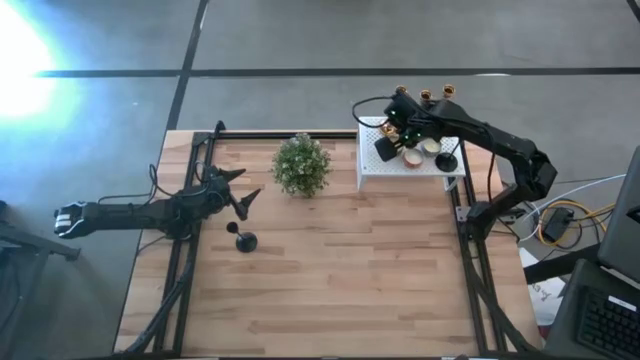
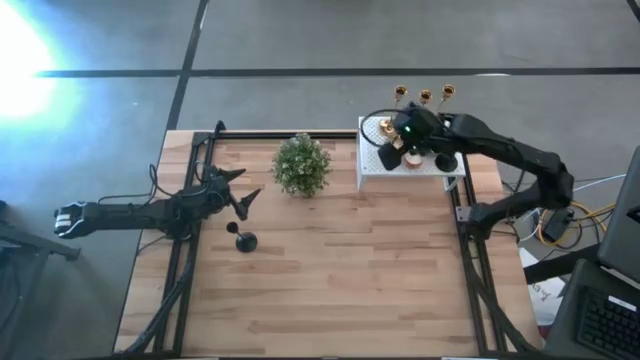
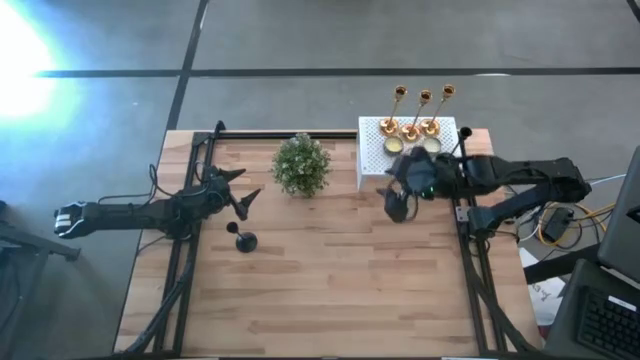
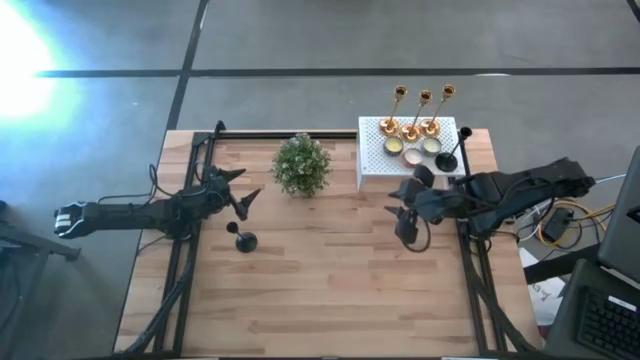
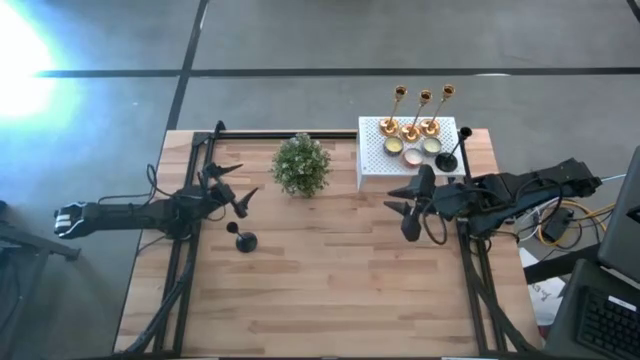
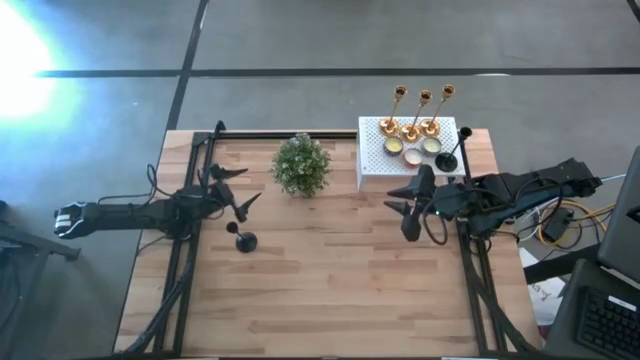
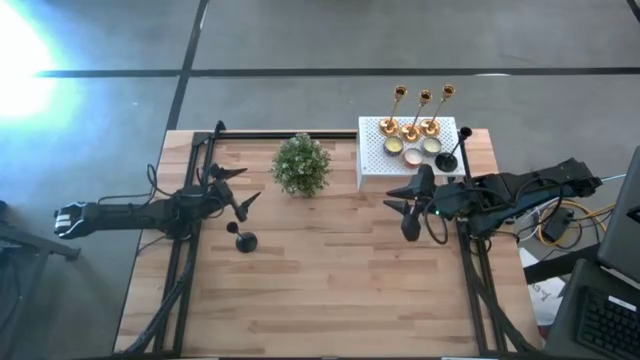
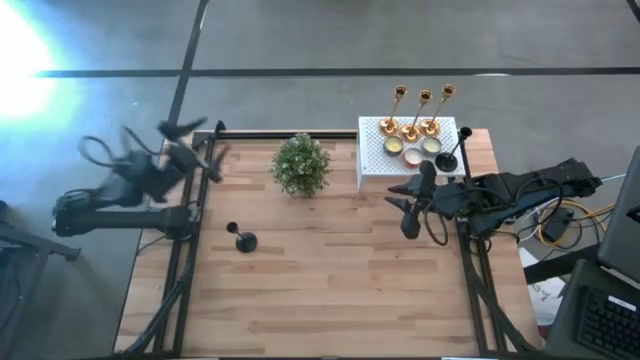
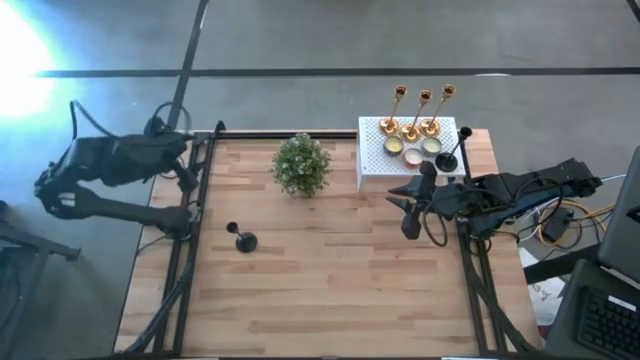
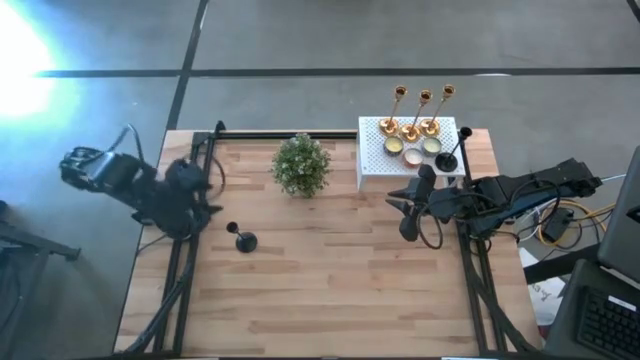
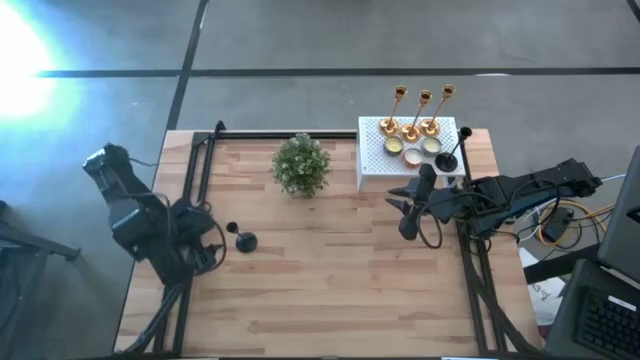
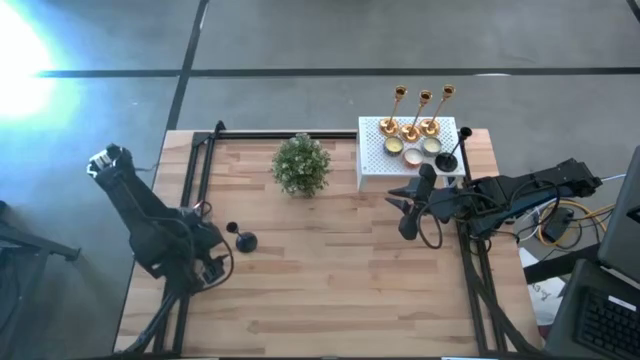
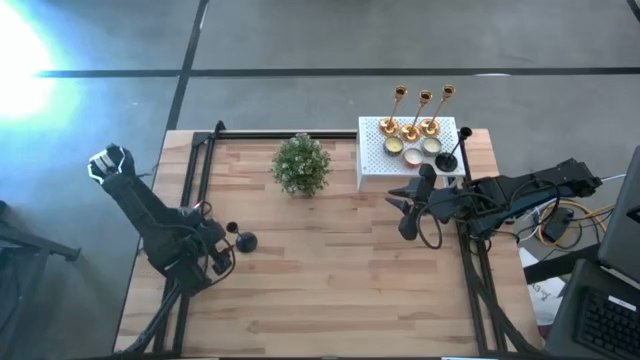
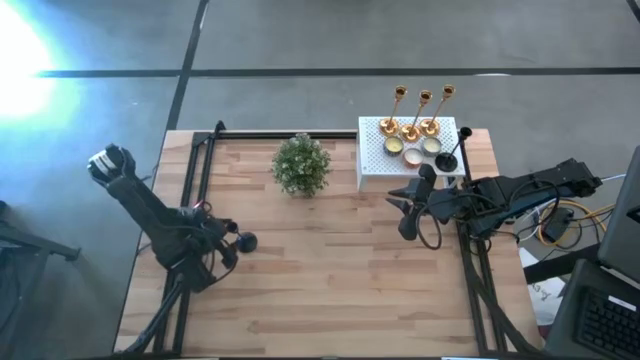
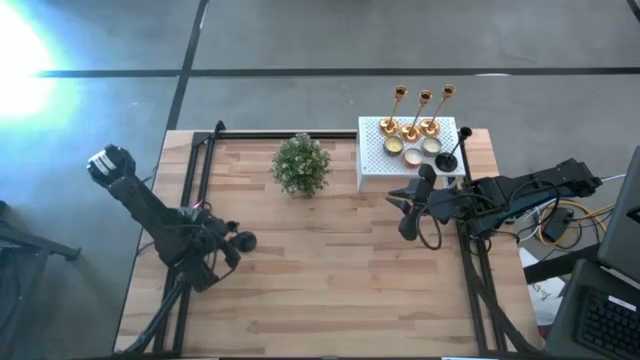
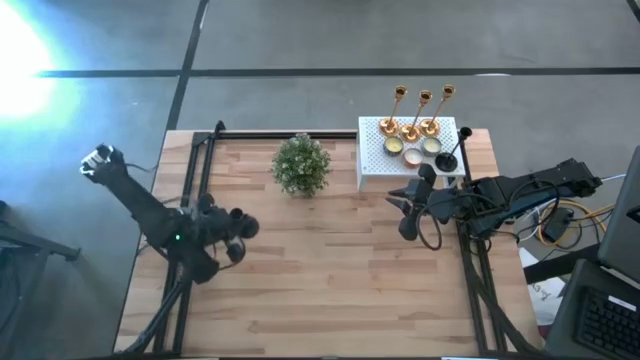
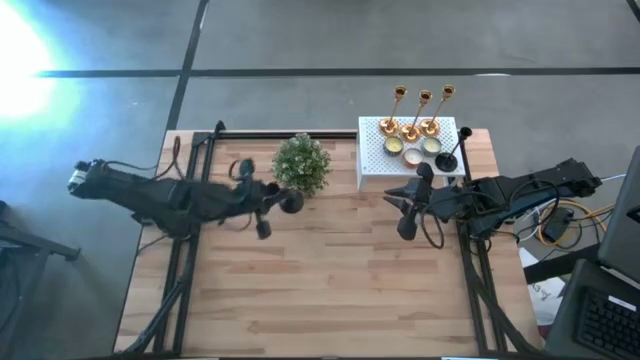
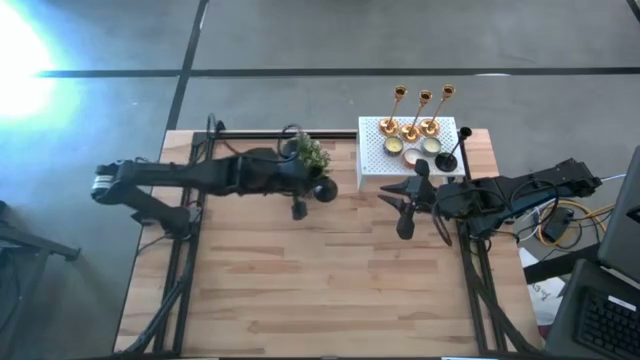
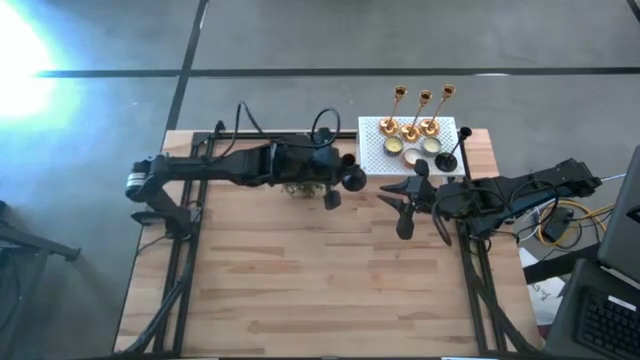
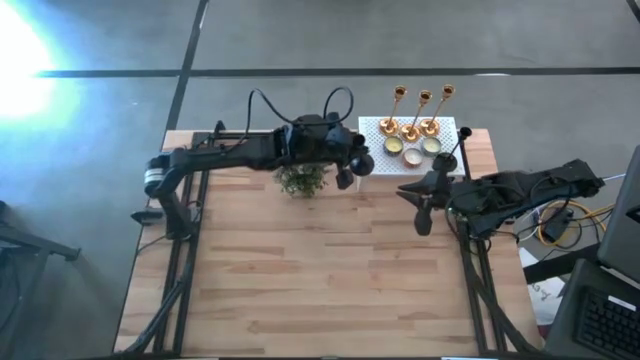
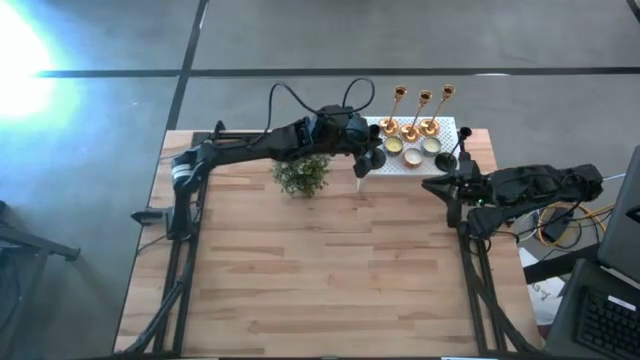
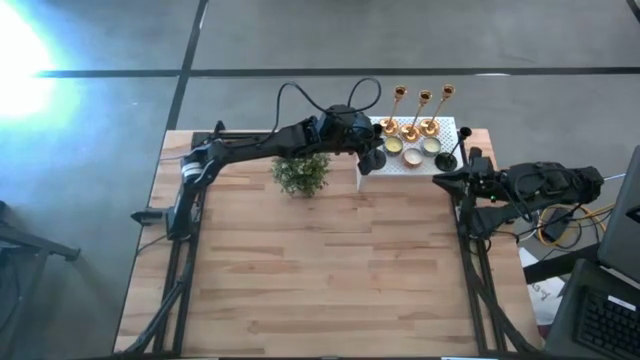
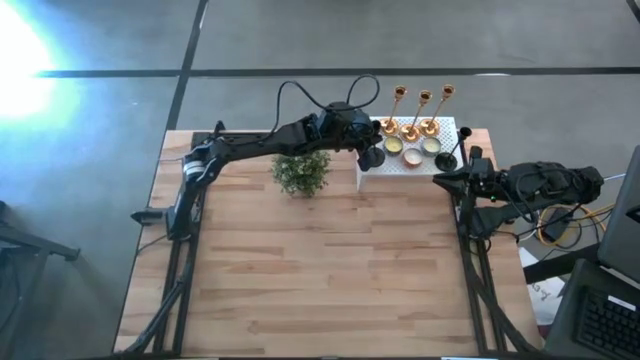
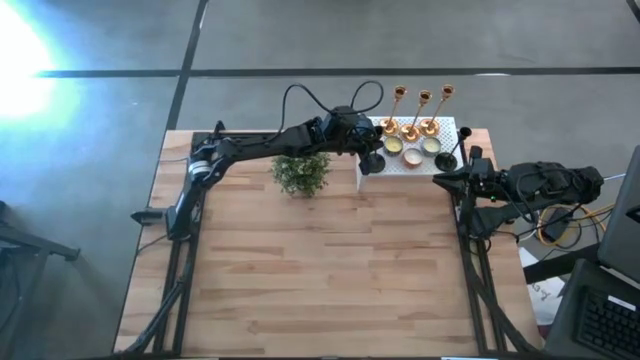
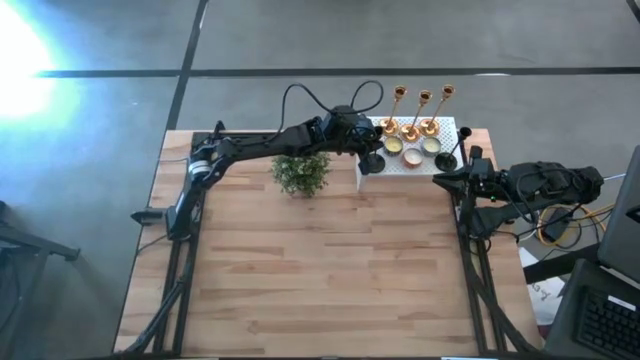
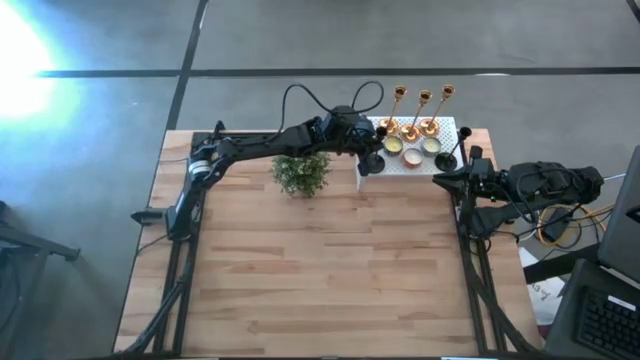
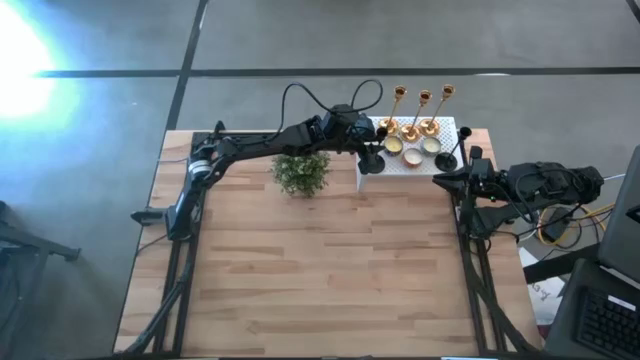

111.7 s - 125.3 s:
Task: Pick & Place candle stick holders
Put the black candle holder on the shelf

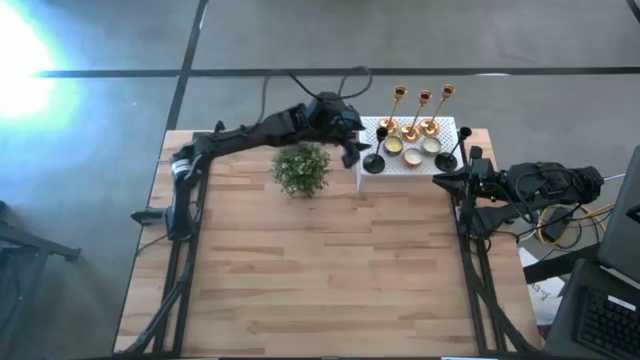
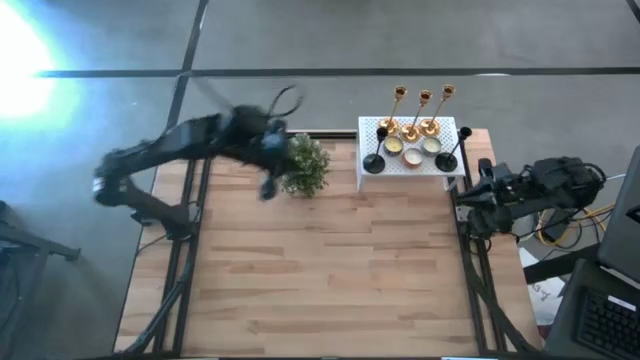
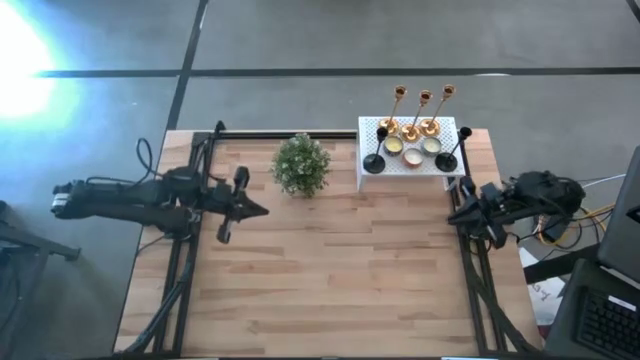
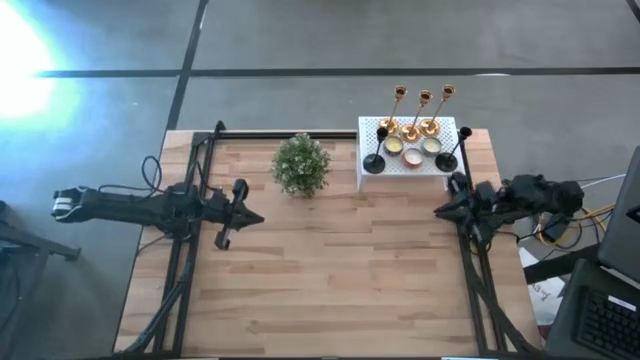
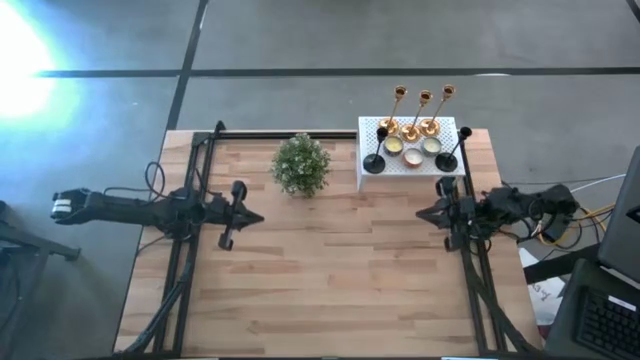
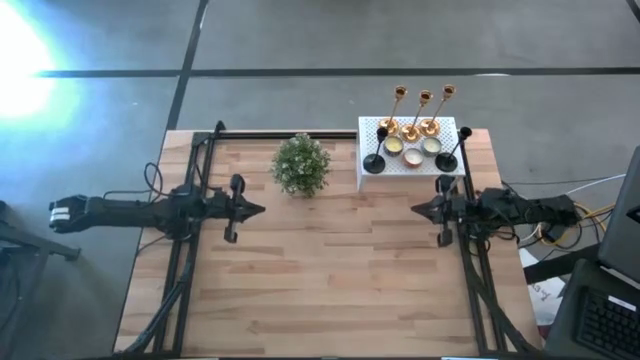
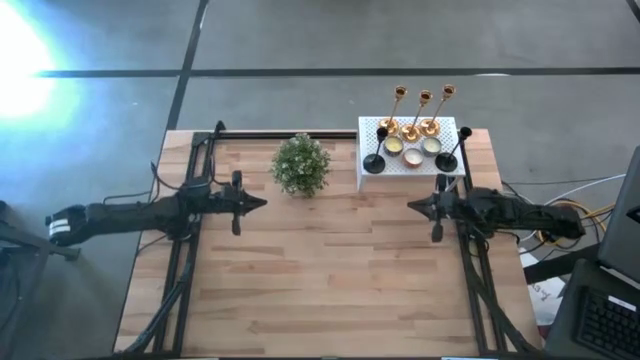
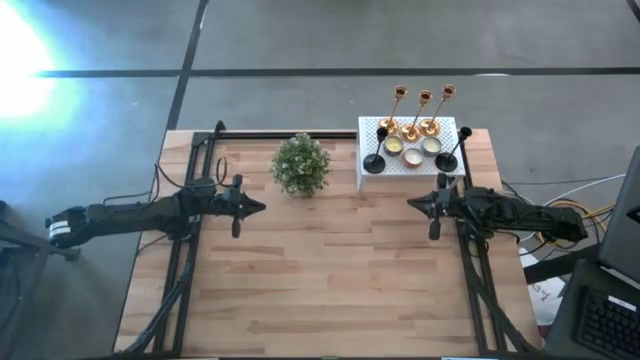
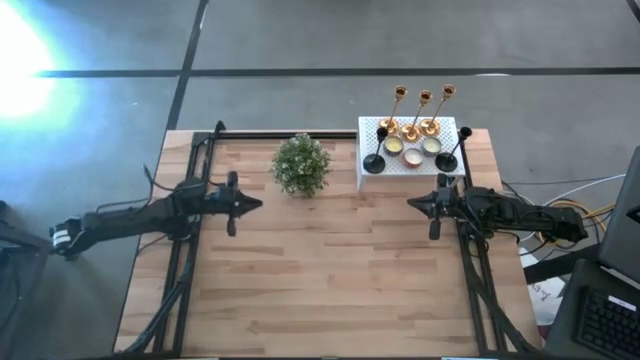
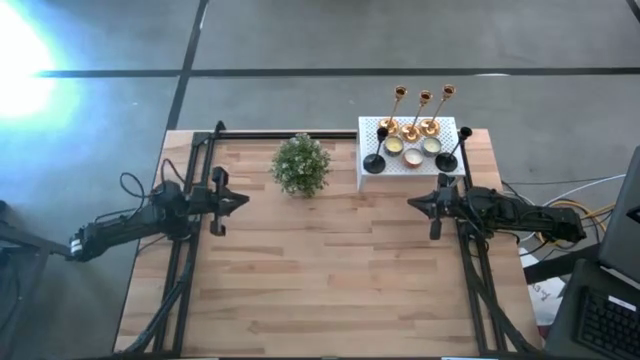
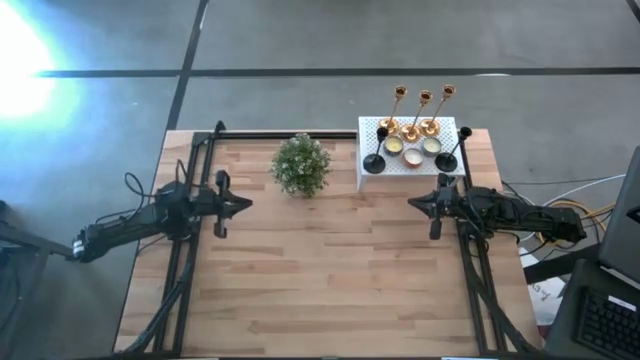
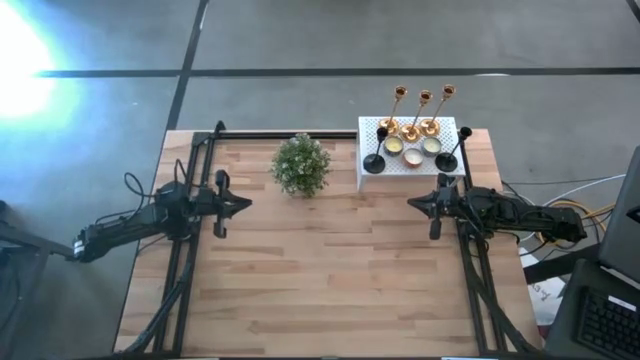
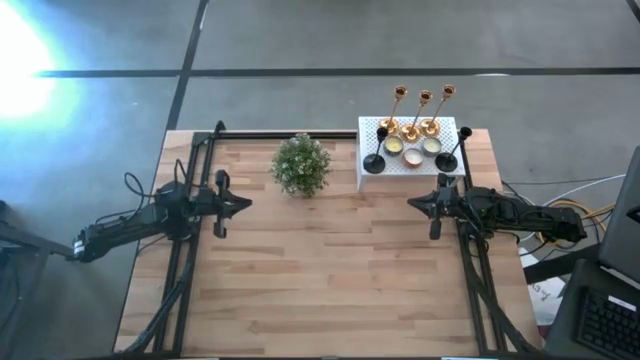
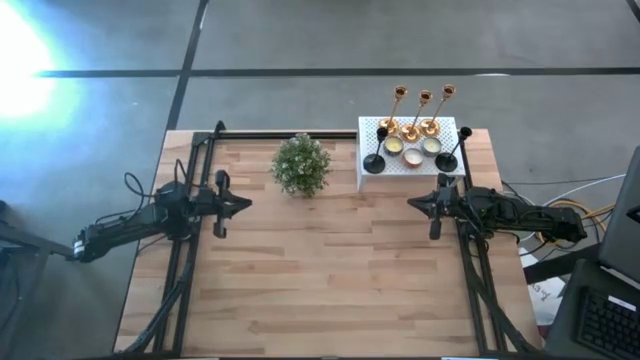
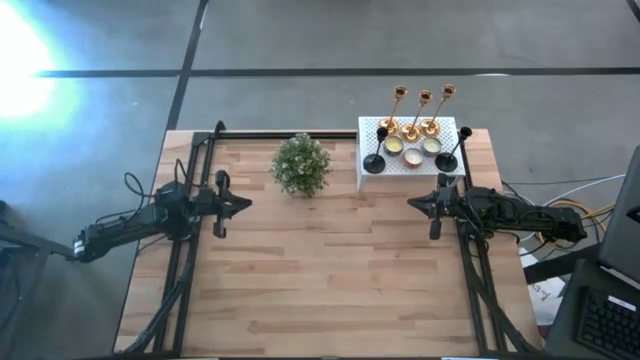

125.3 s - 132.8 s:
Return to Home Position
